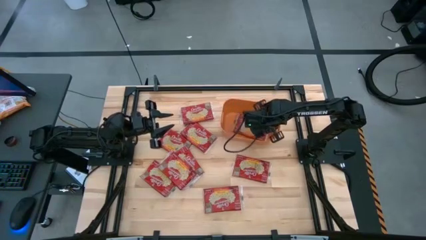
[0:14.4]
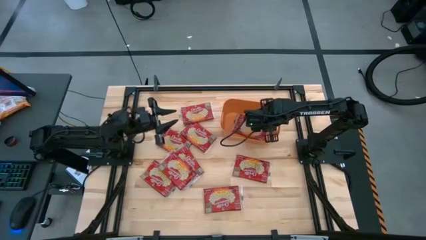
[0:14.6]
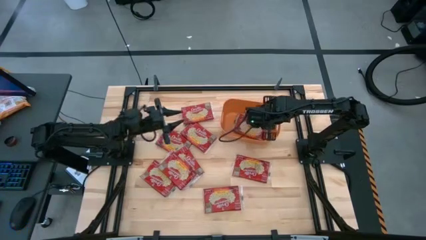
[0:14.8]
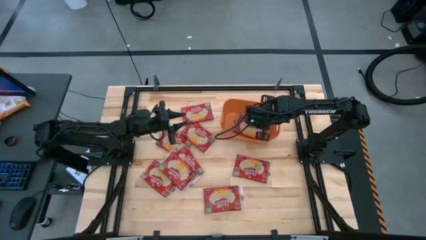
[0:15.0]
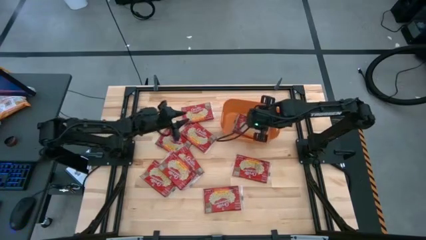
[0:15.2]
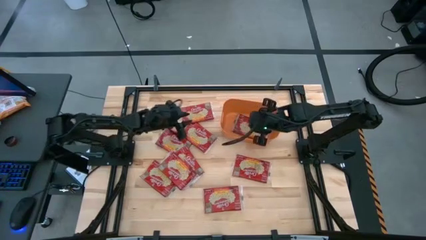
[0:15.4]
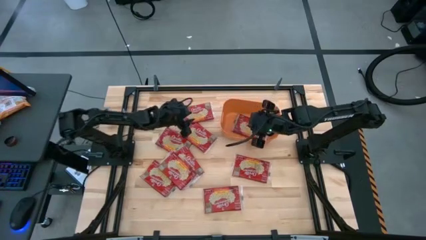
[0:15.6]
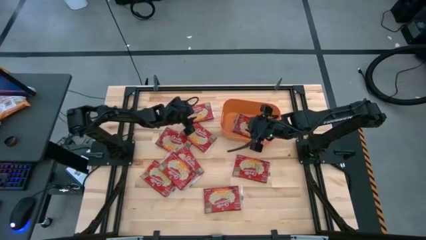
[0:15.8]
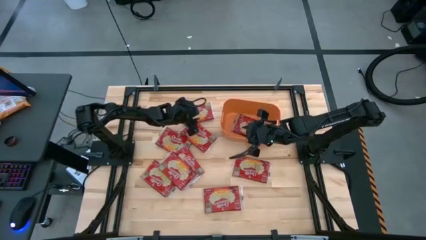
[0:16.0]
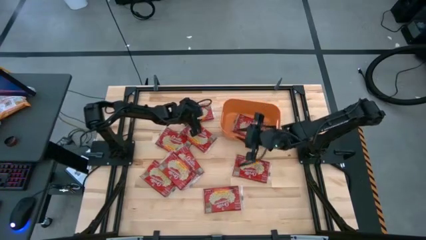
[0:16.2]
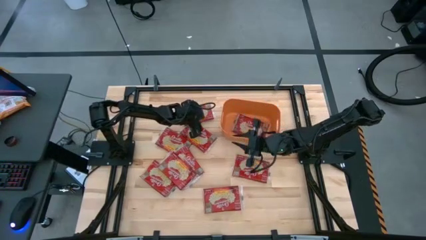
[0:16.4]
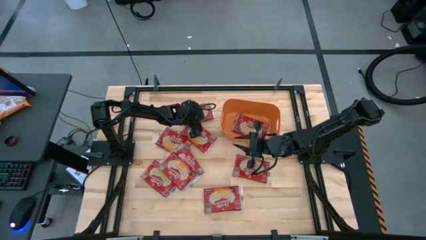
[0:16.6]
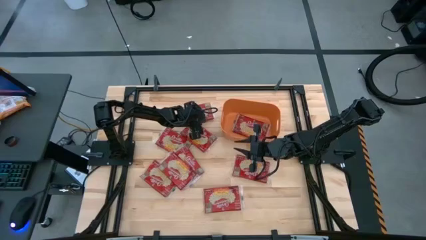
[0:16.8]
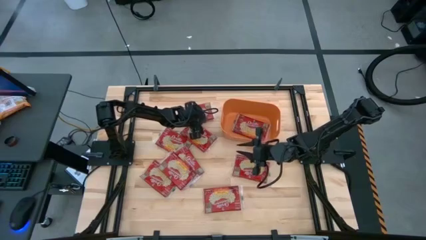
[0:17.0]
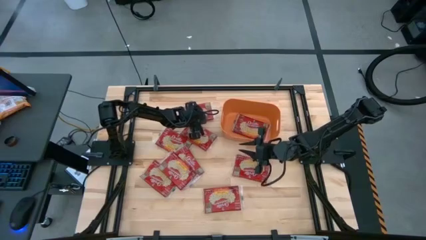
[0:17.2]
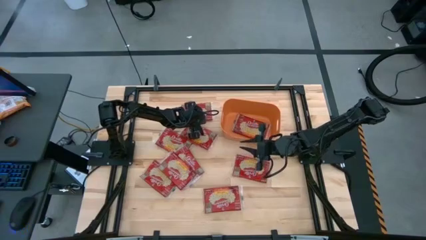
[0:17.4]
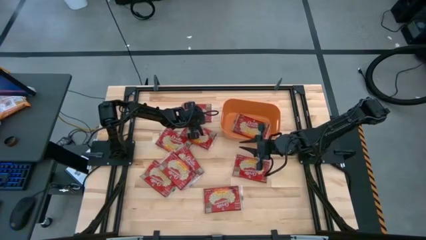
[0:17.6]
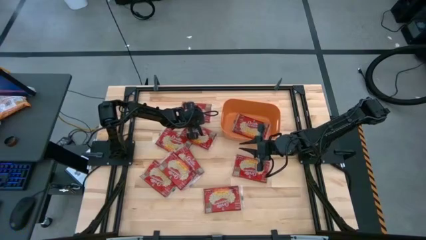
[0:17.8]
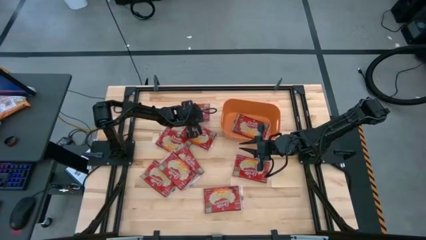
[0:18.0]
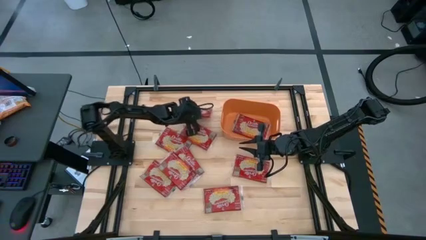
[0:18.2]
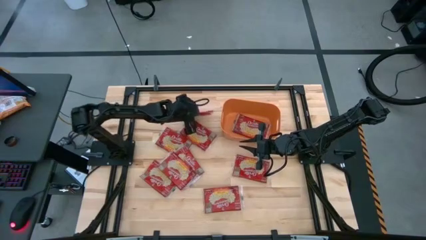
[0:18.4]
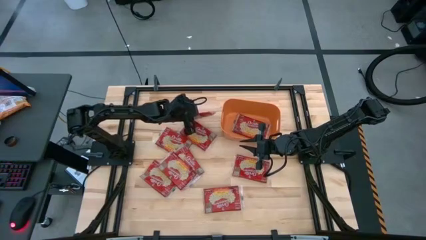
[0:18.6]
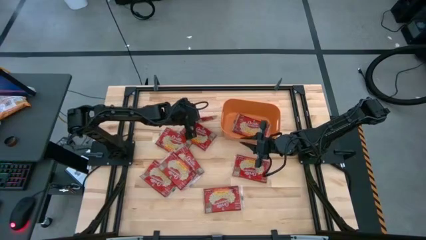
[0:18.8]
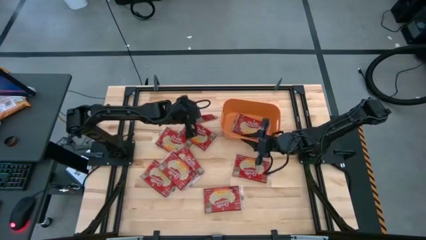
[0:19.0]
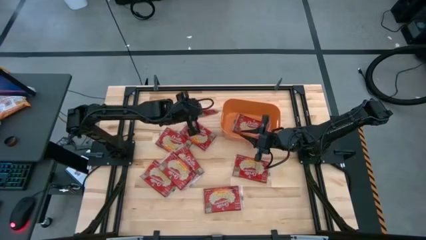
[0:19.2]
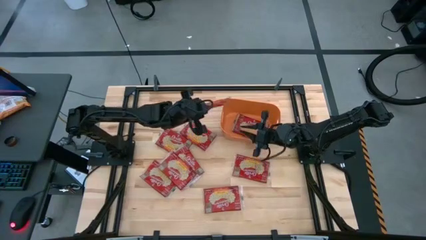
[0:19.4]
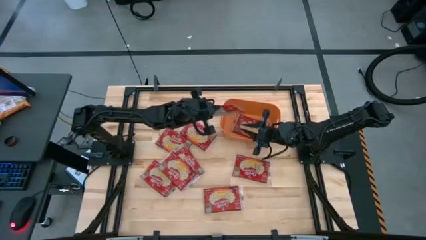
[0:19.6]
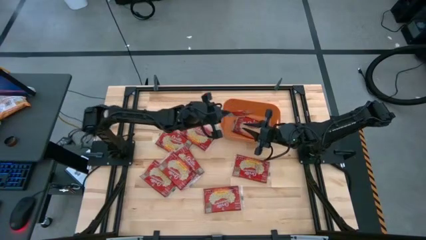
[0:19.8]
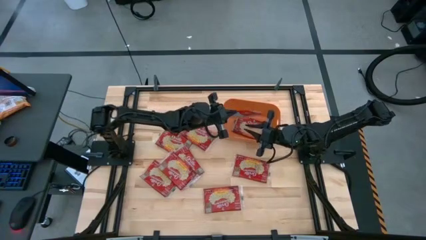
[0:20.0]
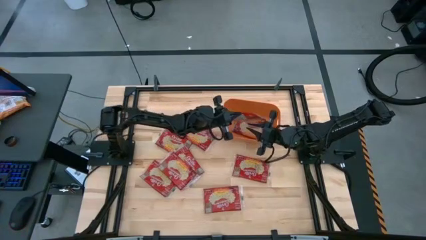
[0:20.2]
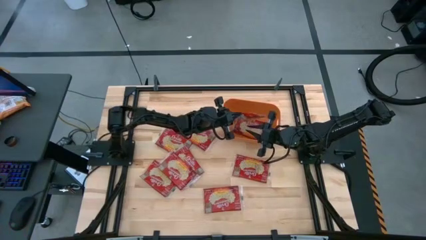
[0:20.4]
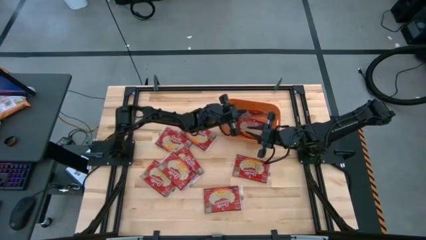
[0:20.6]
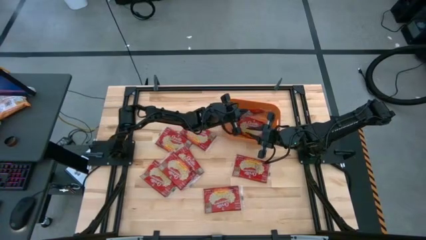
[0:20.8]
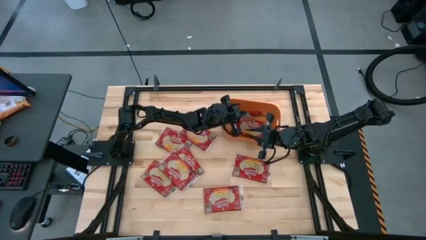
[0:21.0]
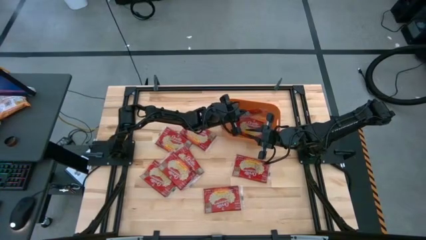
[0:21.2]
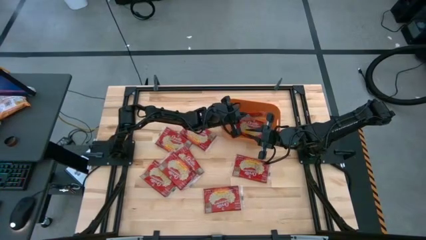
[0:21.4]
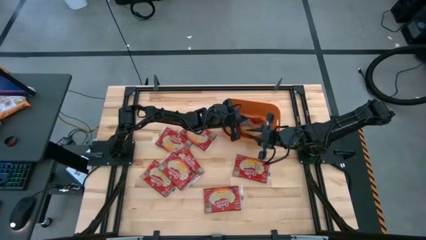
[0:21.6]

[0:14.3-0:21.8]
Task: Sort popcorn bags into baskets
Put the popcorn bag into the orange bin

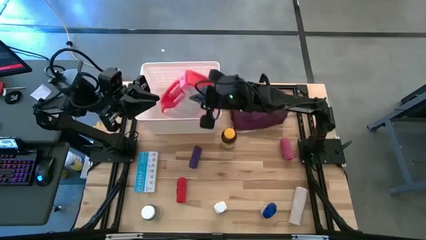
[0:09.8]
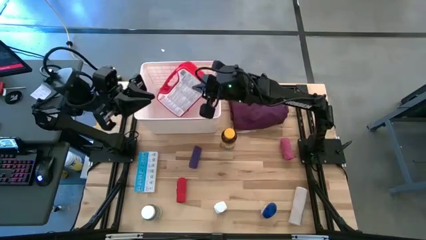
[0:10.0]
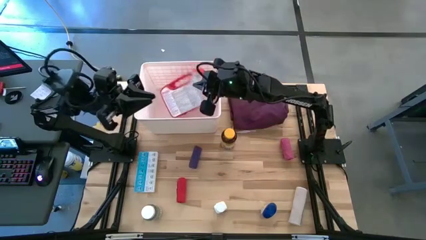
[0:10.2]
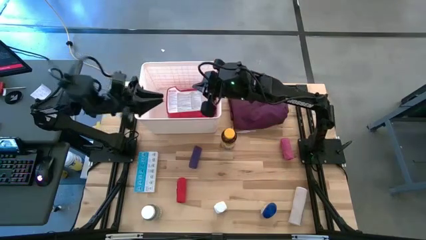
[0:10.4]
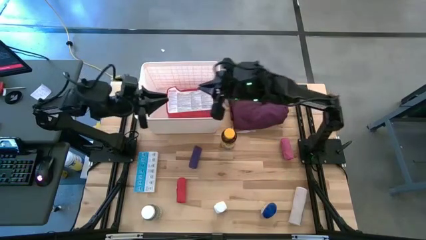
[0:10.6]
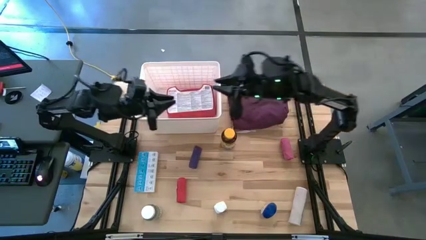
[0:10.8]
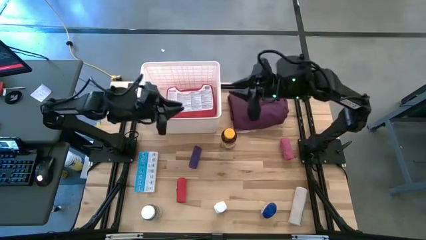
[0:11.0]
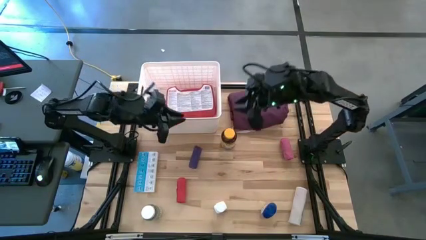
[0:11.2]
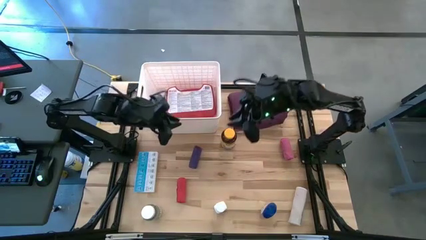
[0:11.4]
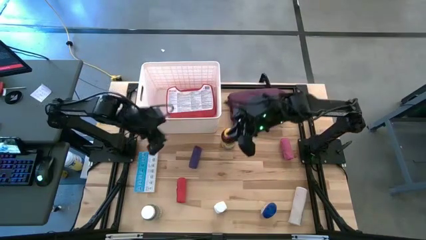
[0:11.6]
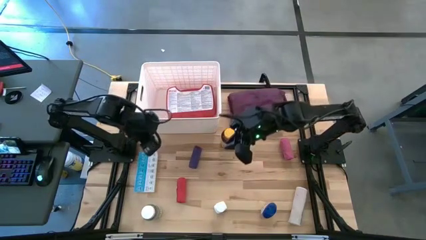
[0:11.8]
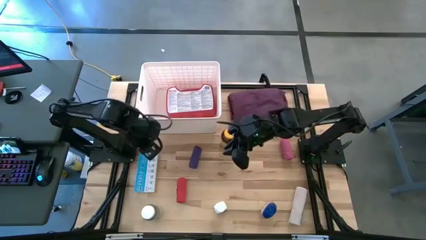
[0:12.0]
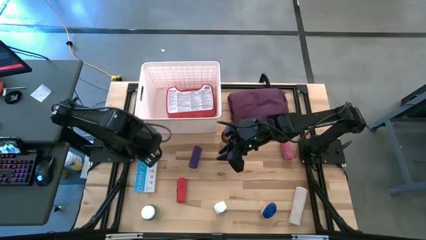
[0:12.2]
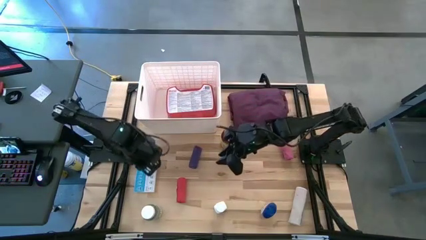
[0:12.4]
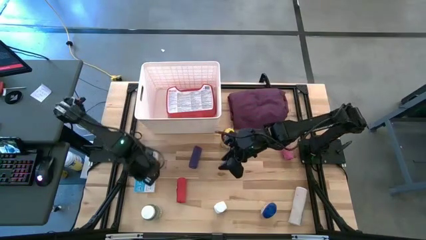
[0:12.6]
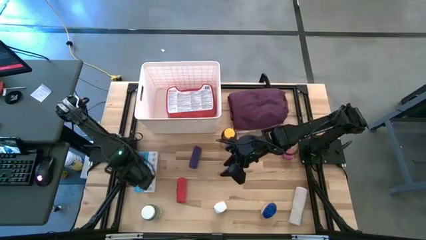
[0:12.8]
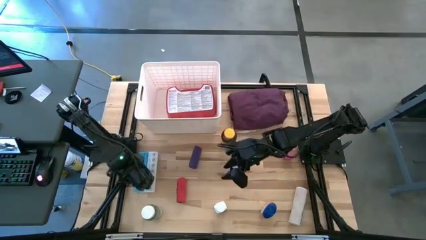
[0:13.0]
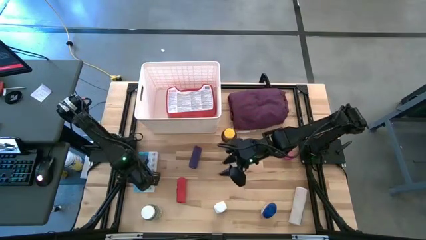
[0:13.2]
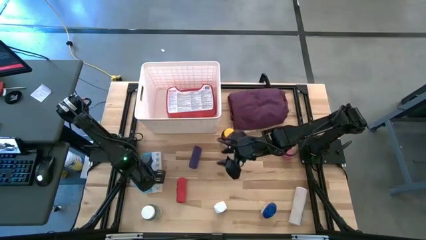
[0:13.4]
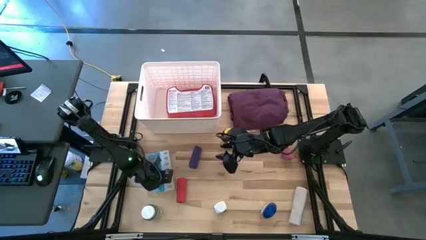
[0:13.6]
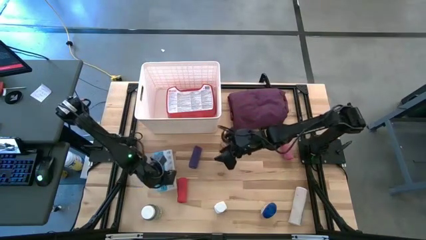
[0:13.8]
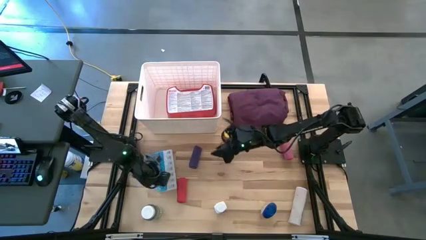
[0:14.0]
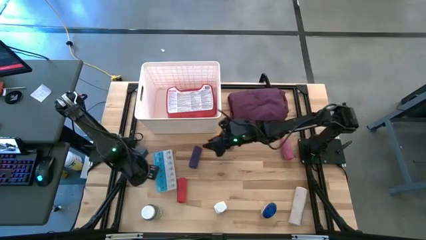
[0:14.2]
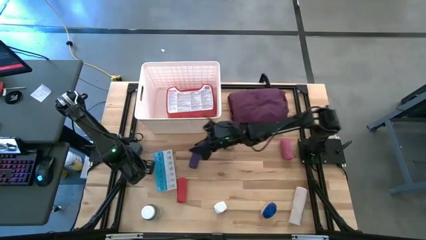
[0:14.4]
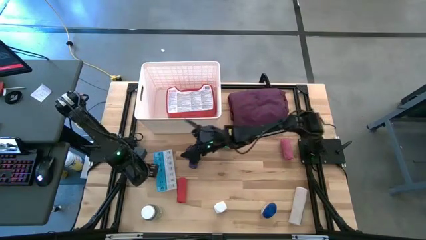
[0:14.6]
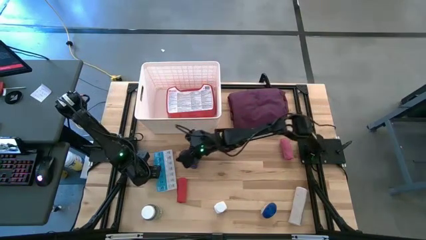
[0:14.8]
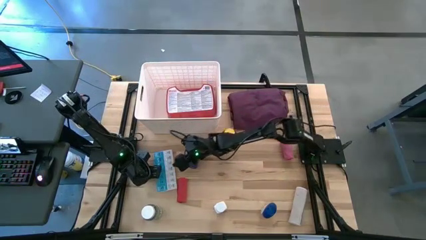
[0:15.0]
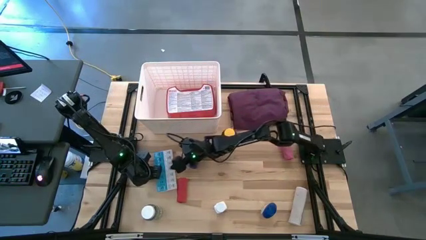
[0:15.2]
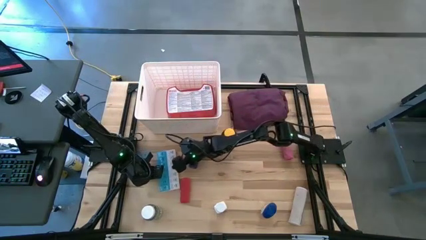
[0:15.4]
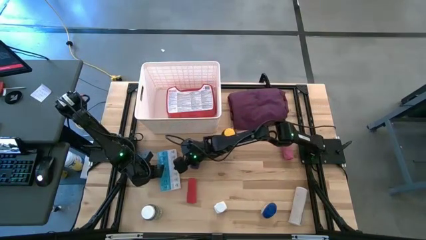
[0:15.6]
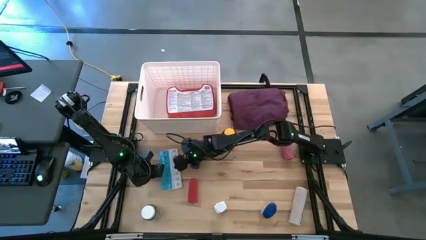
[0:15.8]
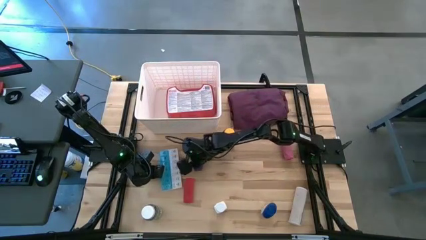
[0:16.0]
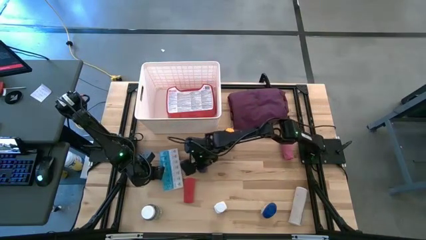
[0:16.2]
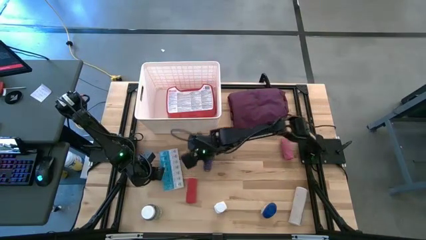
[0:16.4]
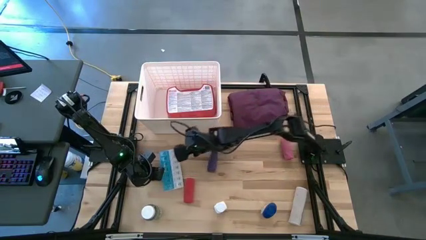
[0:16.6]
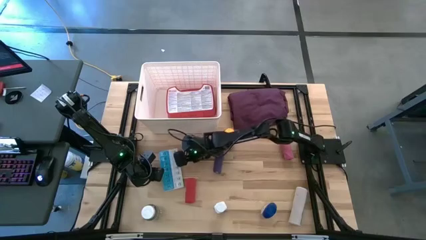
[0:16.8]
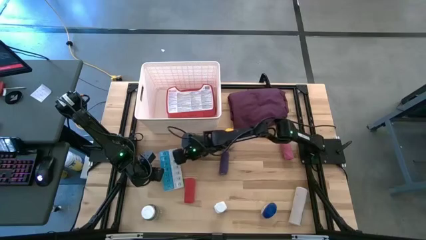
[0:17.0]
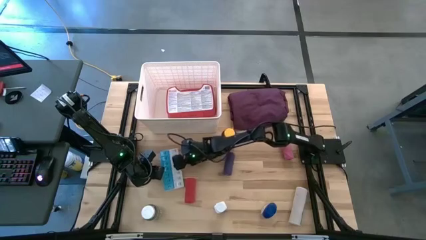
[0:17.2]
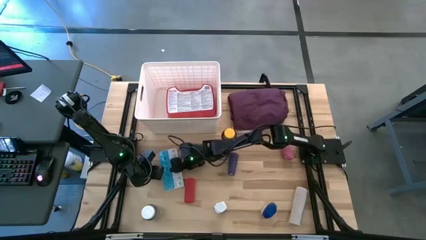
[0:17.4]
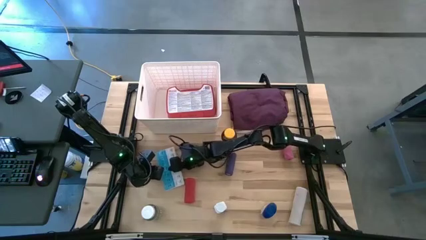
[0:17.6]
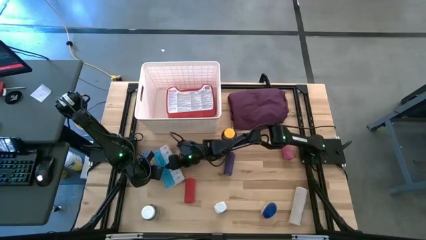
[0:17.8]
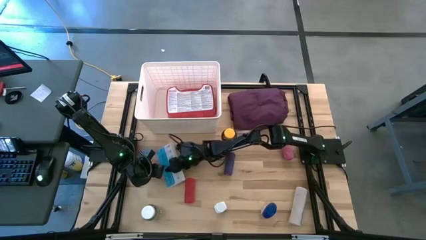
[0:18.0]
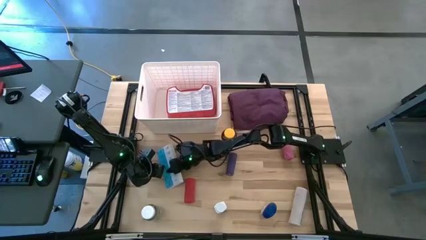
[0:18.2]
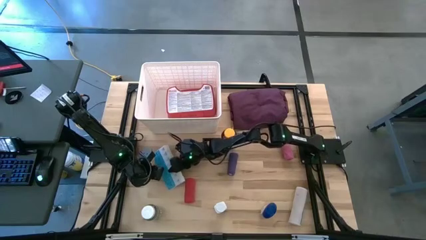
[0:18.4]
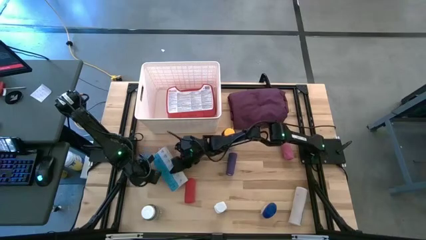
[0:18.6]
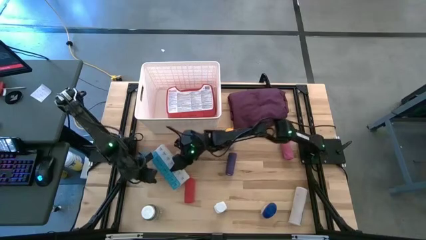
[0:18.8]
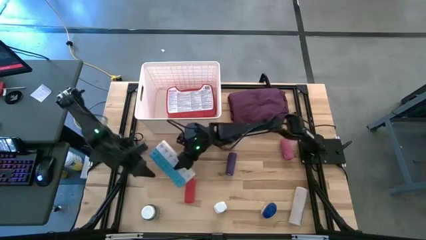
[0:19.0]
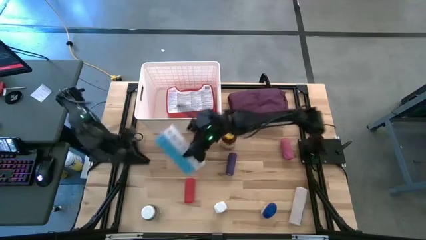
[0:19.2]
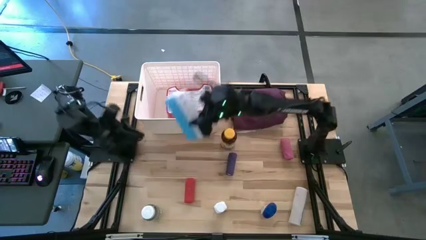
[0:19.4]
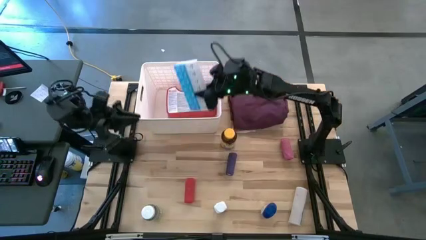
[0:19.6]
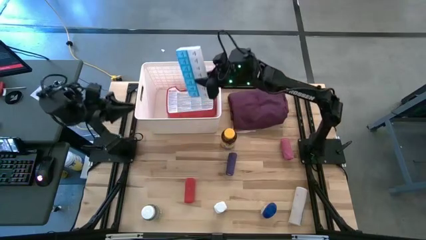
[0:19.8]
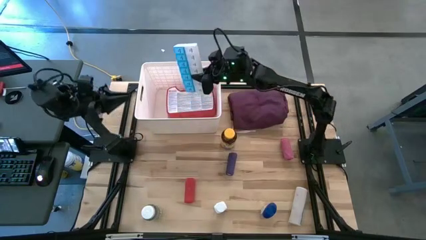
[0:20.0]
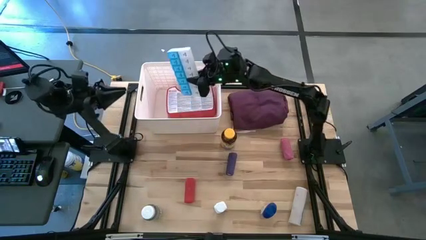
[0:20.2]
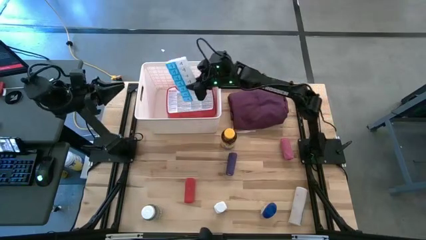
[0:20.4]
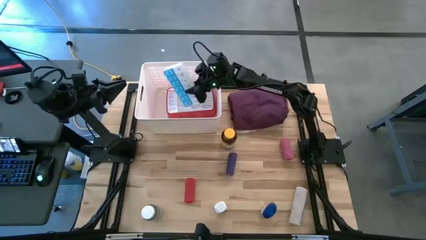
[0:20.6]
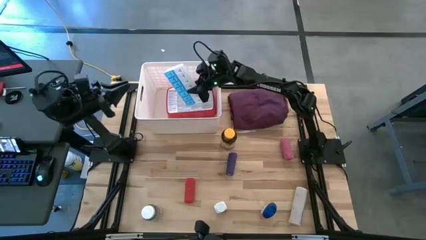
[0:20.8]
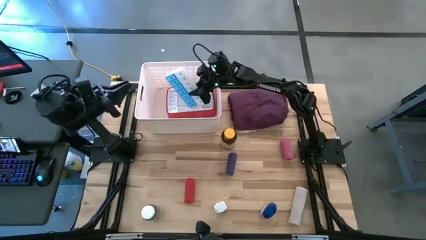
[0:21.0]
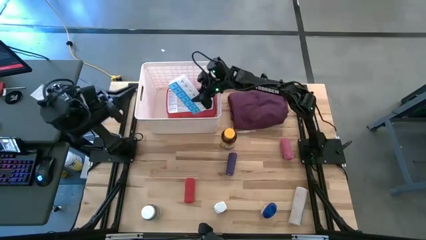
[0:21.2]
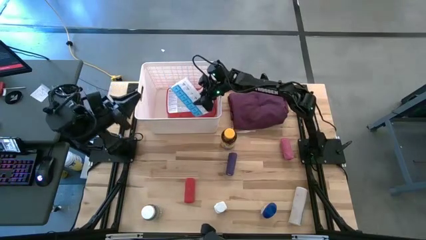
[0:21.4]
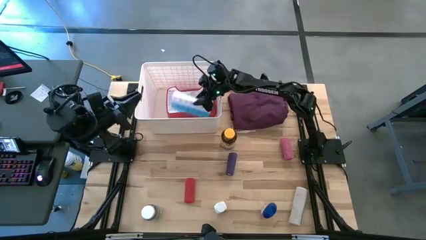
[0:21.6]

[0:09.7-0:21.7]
Task: Pick & place medical supplies in basket/bin
Put the blue and white pill organizer into the white bin
